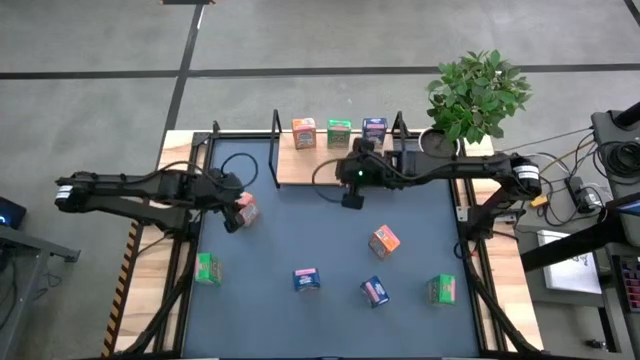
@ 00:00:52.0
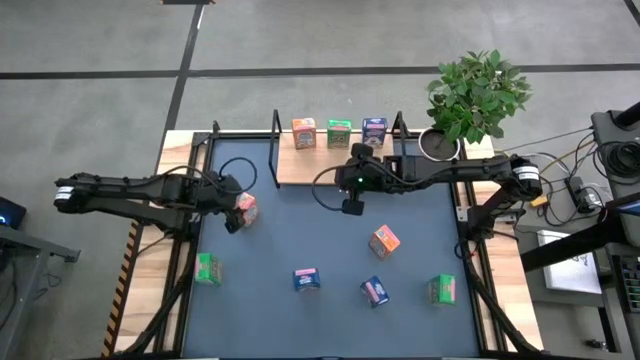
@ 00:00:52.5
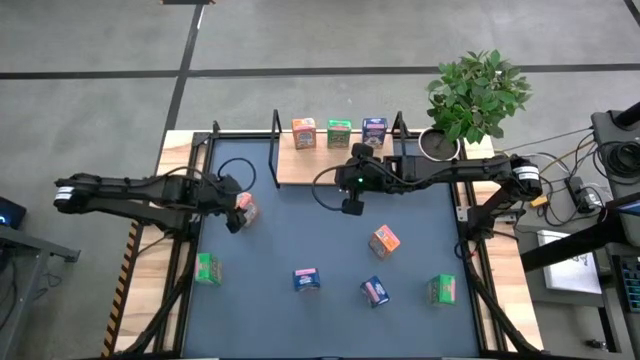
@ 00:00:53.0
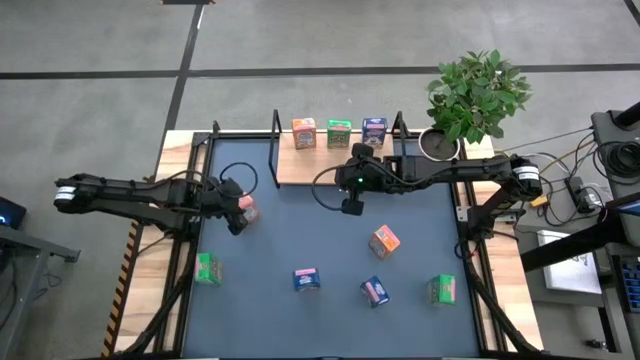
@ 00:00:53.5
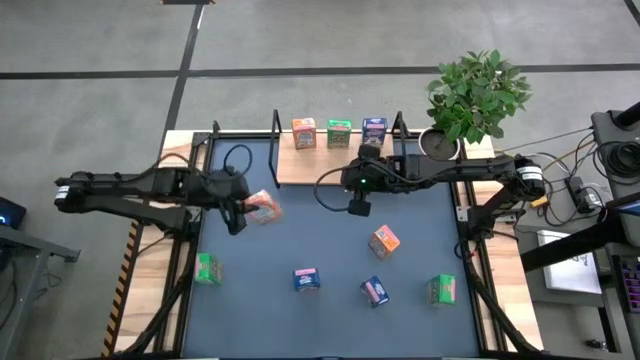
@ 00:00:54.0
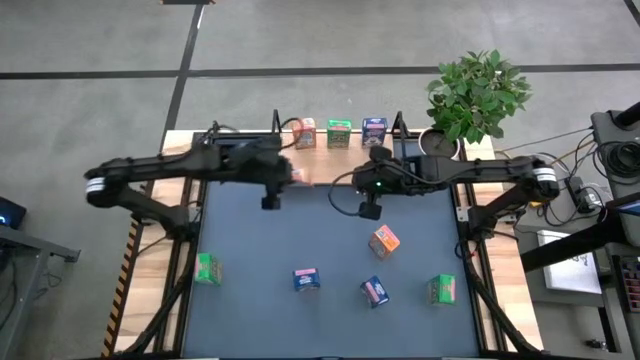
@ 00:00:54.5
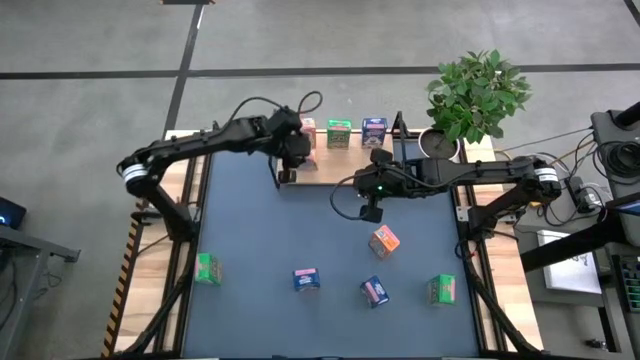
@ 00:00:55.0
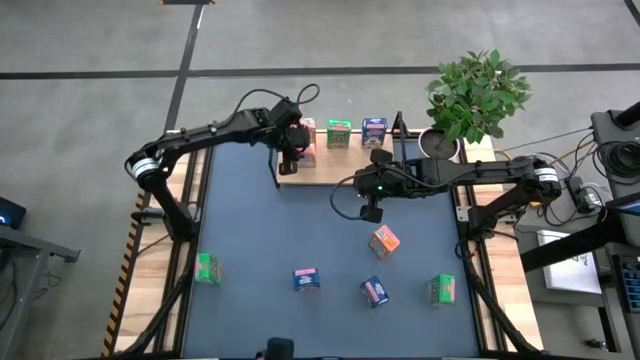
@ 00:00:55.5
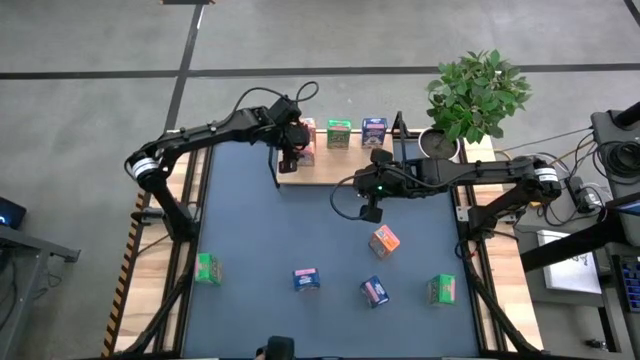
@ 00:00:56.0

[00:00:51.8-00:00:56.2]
Task: Stack cereal on shelf
Put the left orange cereal box on the shelf

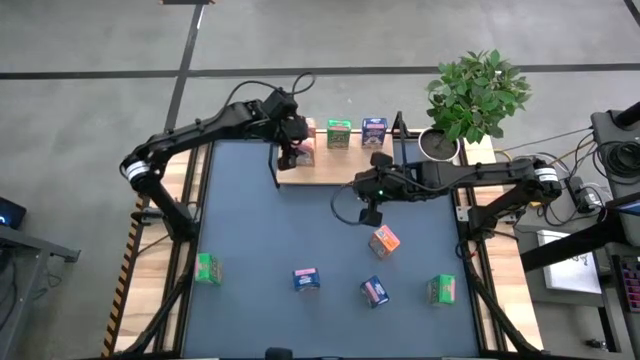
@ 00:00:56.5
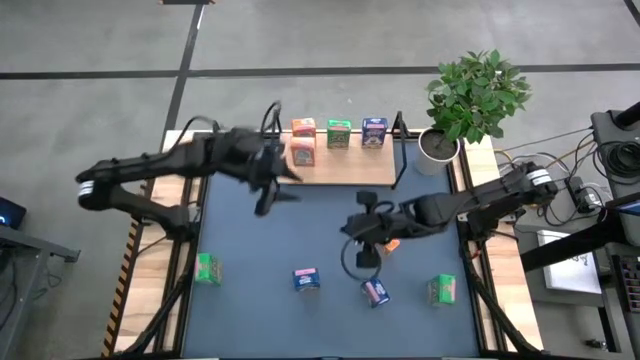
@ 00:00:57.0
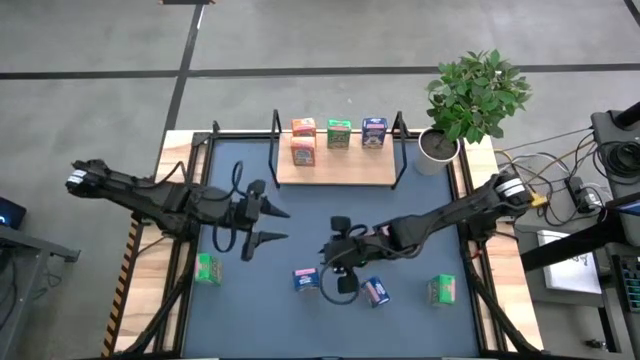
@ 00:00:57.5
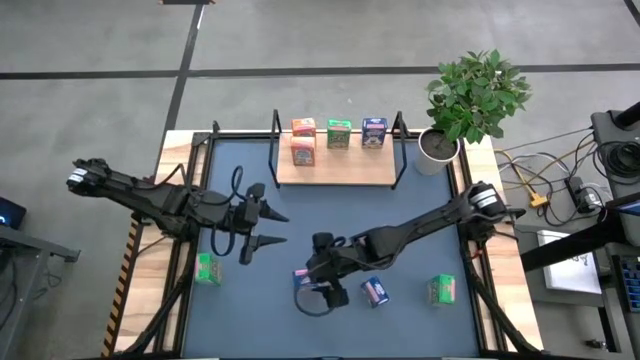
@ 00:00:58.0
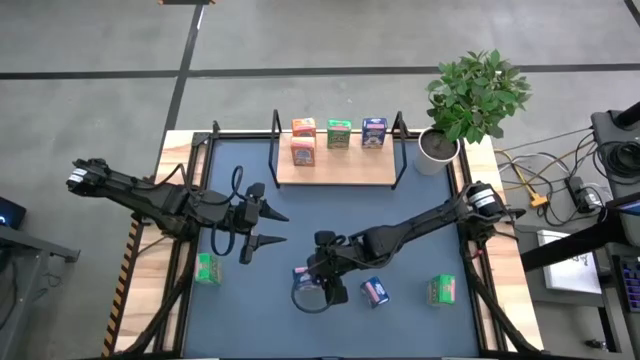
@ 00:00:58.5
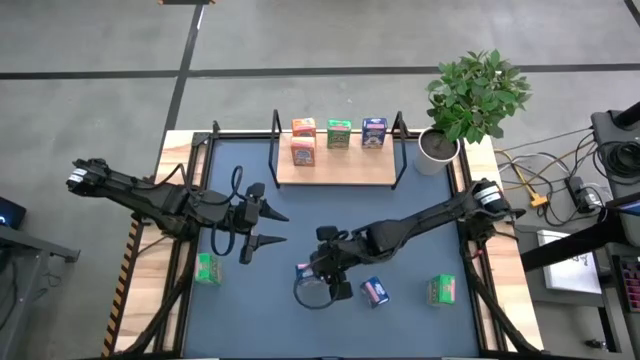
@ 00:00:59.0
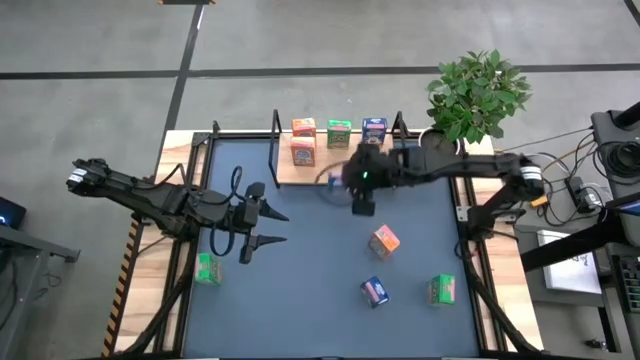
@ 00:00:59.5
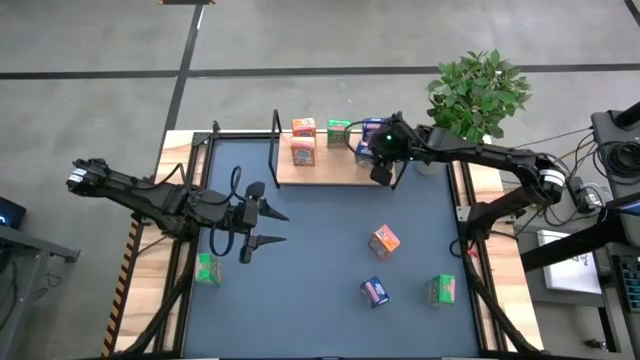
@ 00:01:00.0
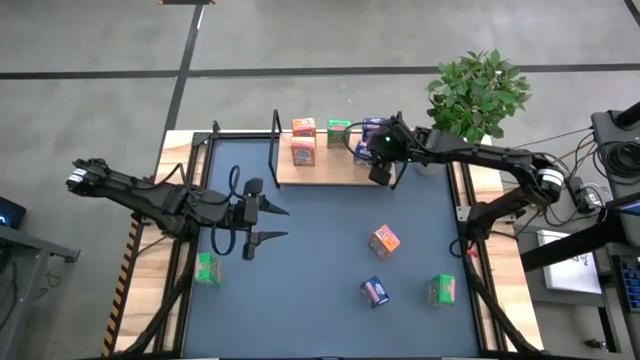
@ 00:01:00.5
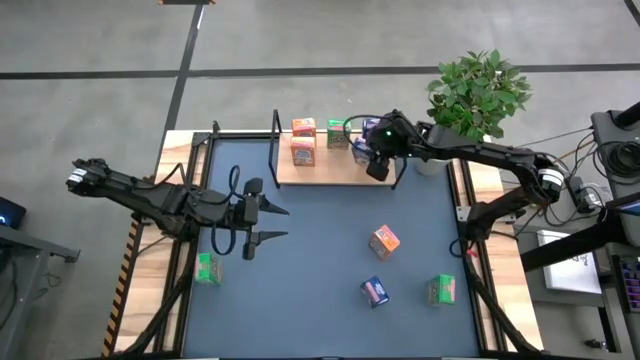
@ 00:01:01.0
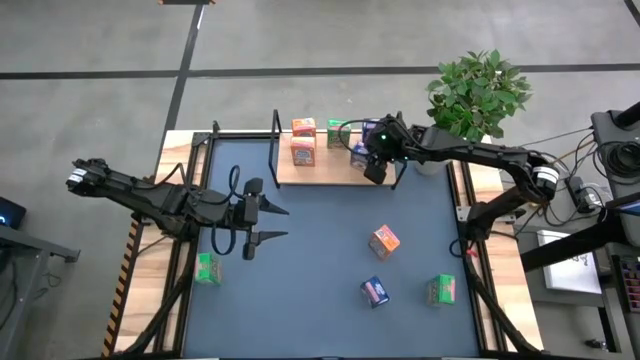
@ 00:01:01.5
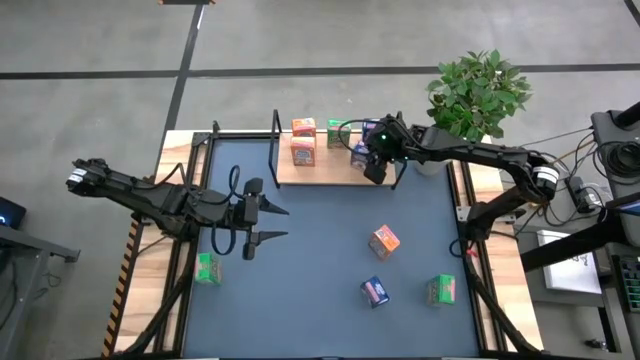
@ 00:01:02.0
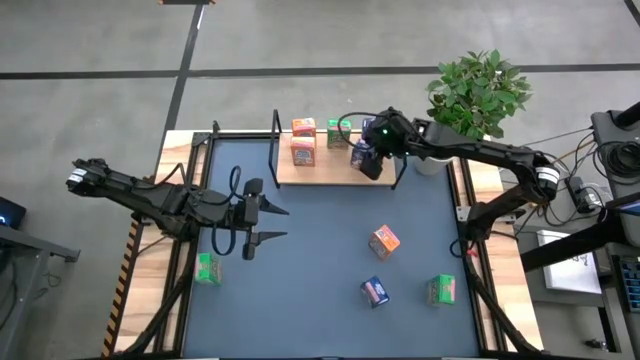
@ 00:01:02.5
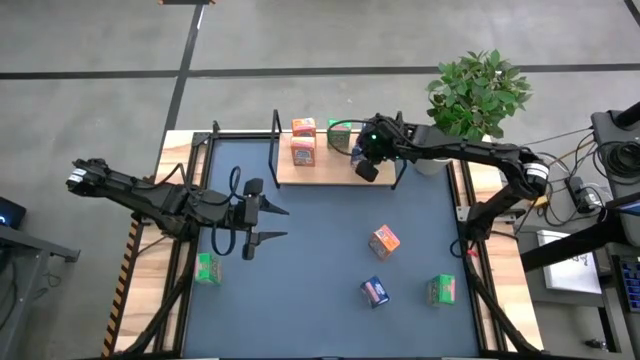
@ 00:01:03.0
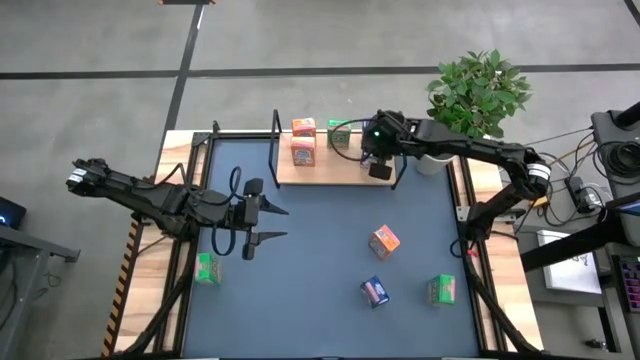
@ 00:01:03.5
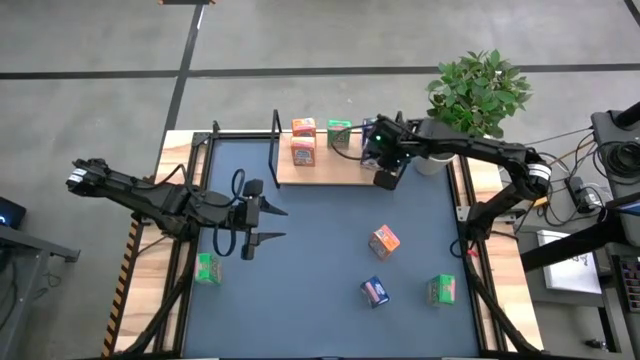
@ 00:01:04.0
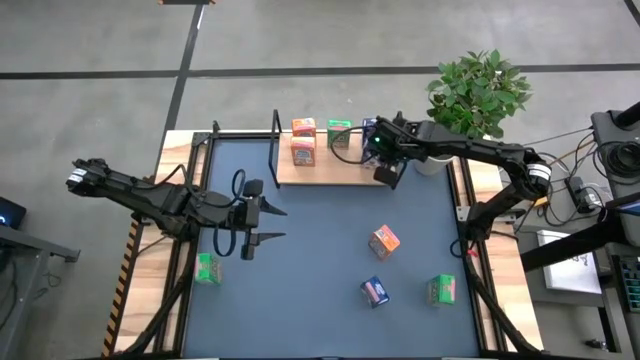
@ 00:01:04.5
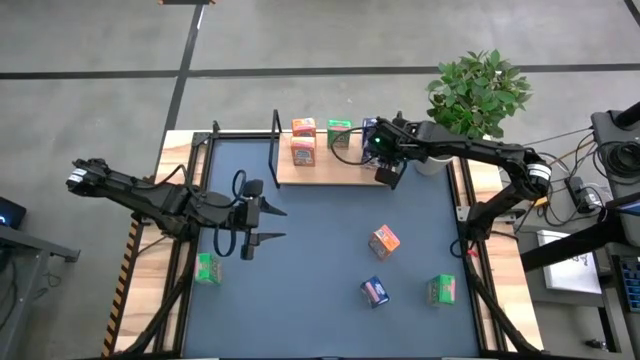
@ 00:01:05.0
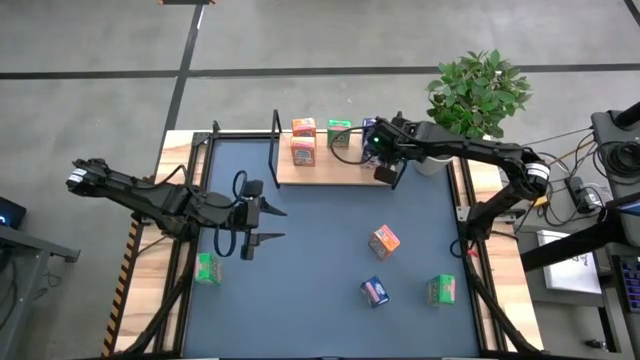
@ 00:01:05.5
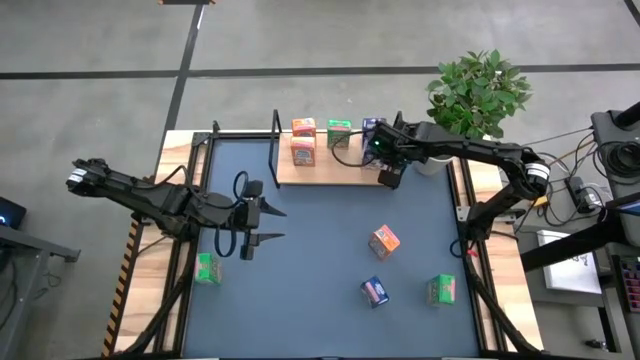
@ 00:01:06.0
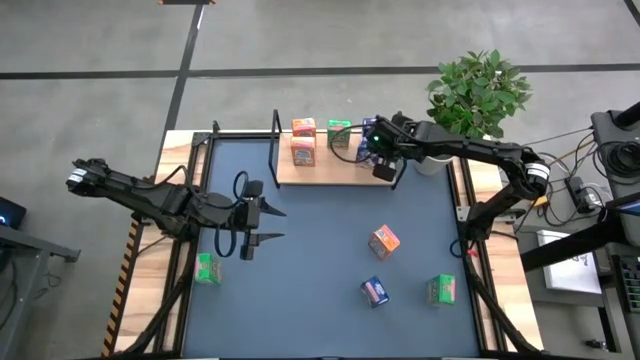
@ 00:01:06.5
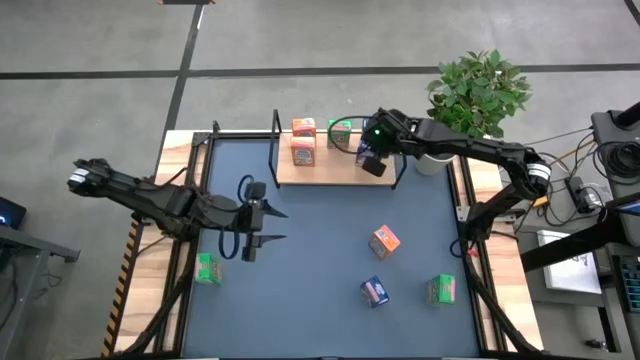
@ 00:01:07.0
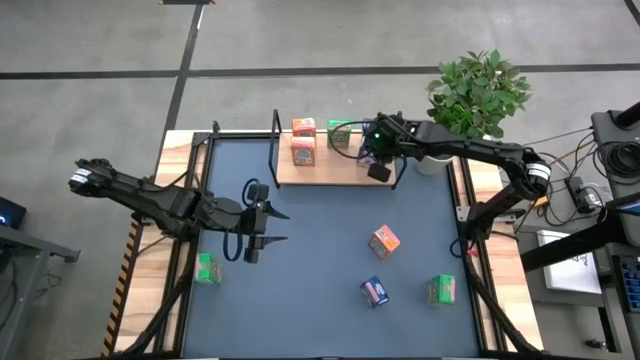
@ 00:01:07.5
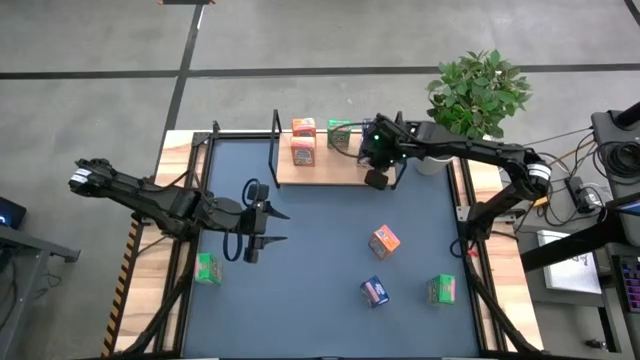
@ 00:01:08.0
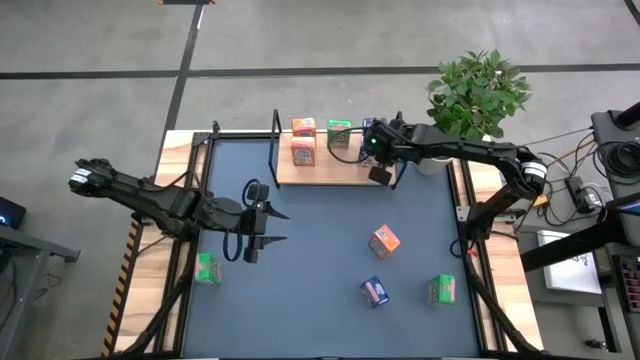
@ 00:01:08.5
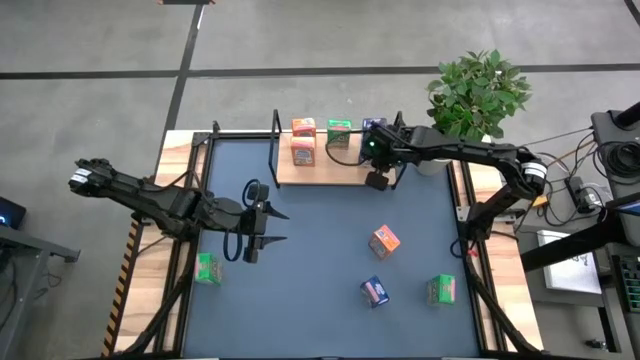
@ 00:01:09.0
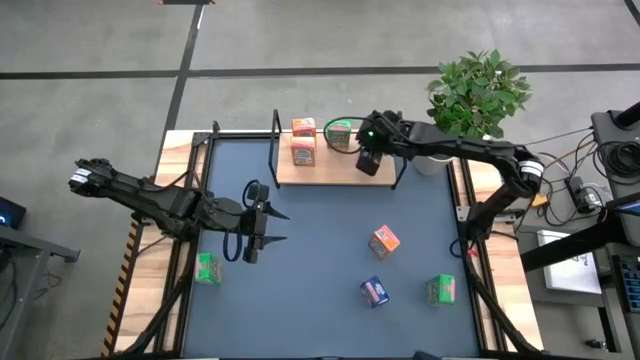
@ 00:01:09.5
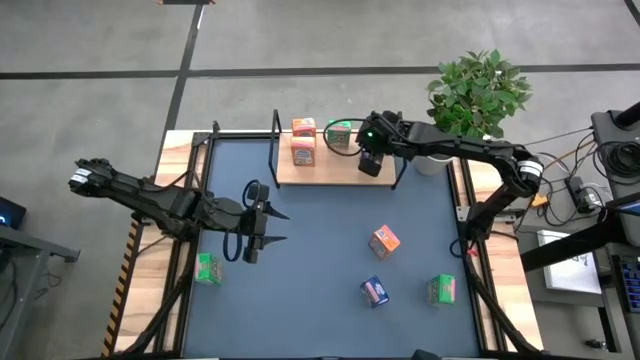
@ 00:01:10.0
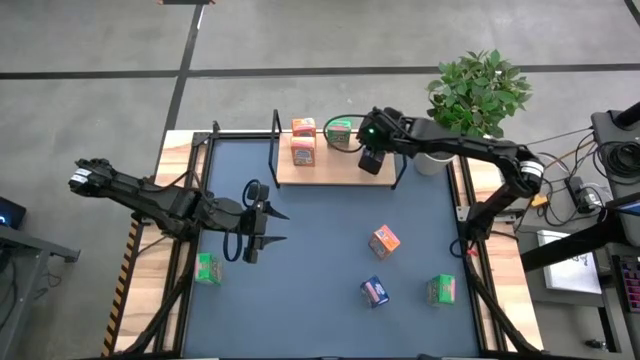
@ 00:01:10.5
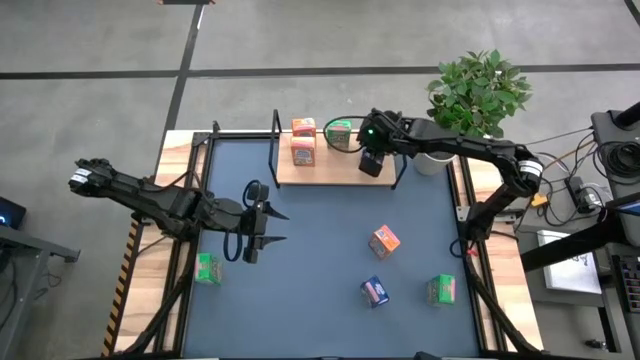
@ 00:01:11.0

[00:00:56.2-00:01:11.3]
Put the left blue cereal box on the shelf

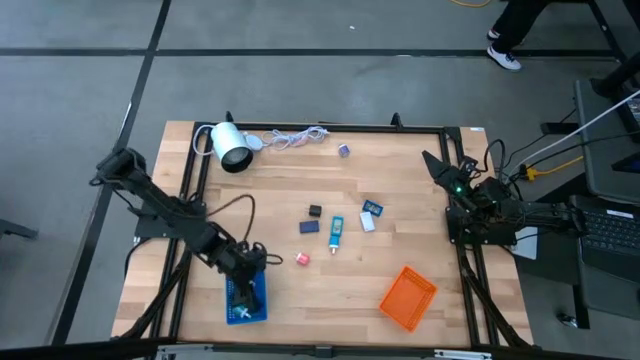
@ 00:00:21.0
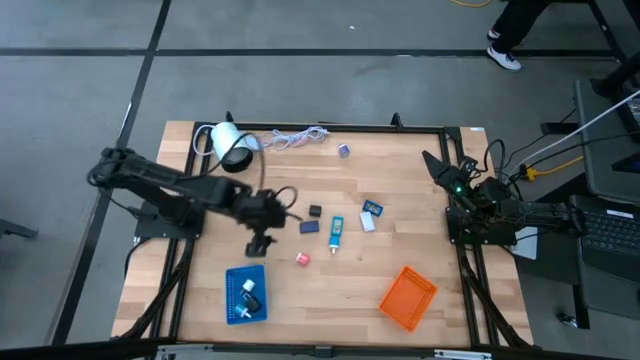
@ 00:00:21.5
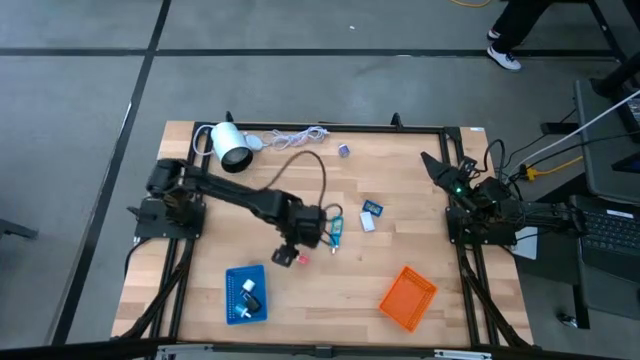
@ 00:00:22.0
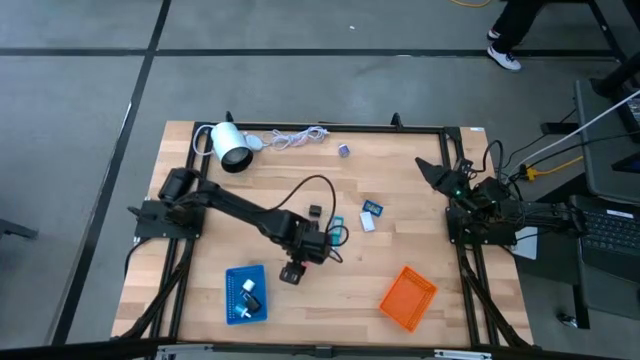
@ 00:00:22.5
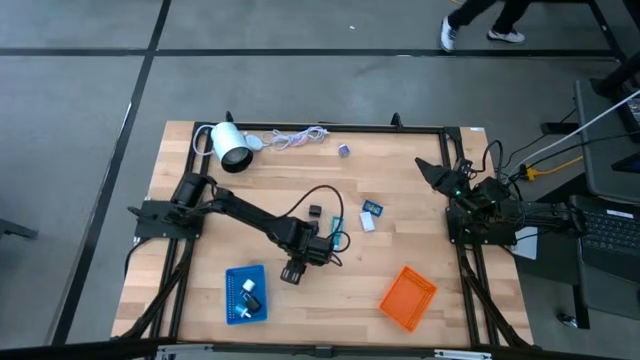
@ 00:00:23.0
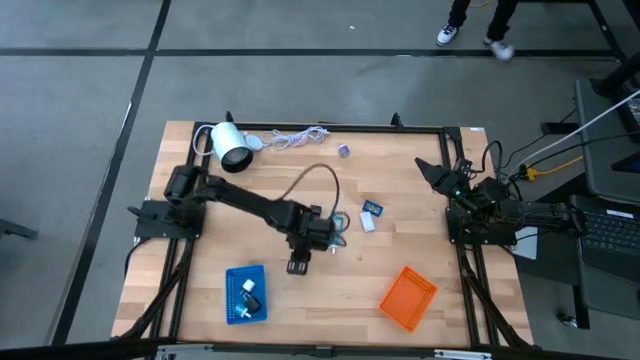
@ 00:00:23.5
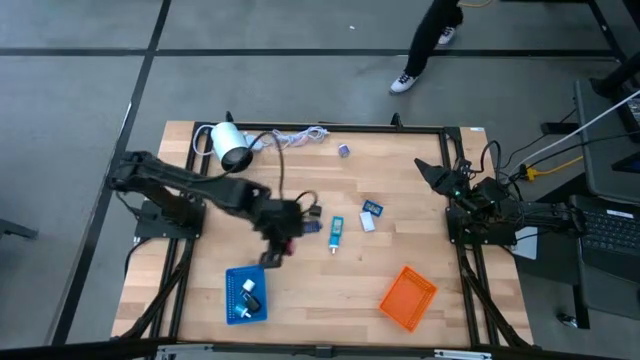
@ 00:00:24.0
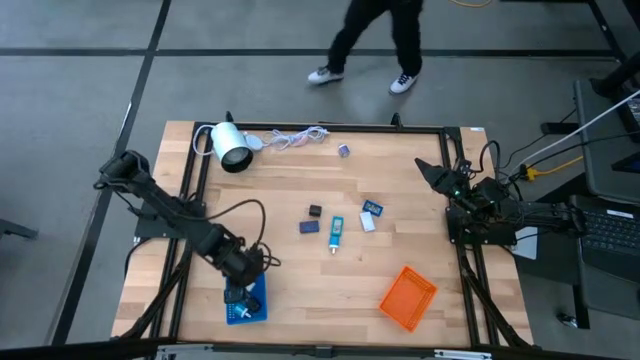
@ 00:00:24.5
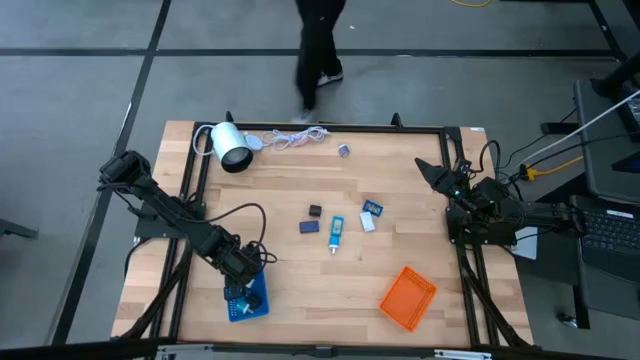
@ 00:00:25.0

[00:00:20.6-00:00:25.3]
Task: Pick & Place Office items
Put the red charger adapter into the blue basket
